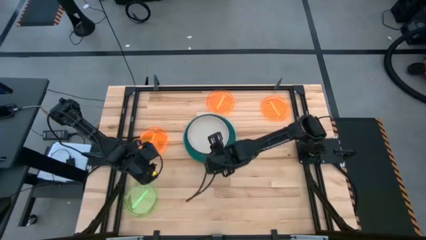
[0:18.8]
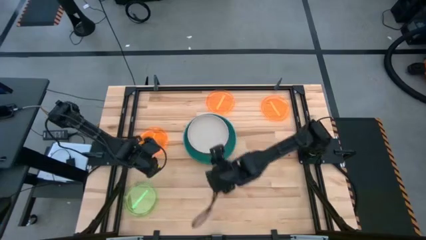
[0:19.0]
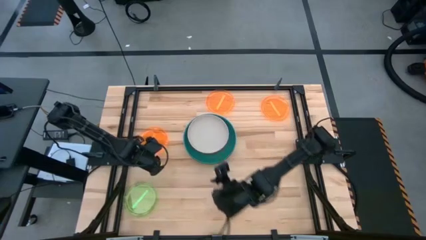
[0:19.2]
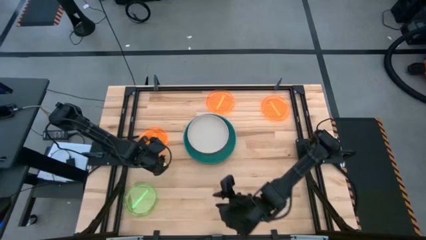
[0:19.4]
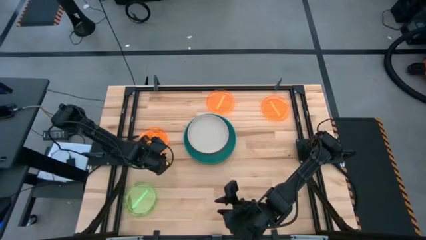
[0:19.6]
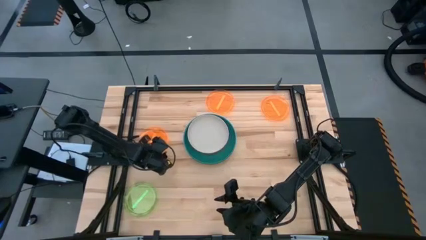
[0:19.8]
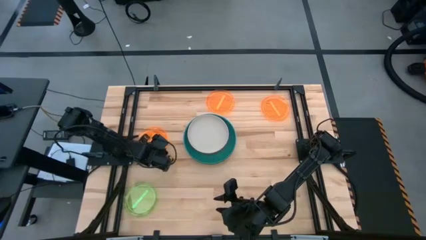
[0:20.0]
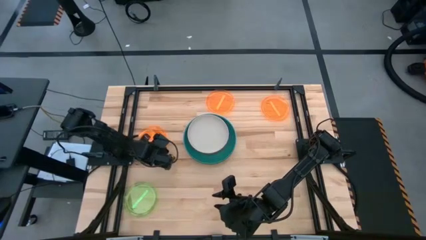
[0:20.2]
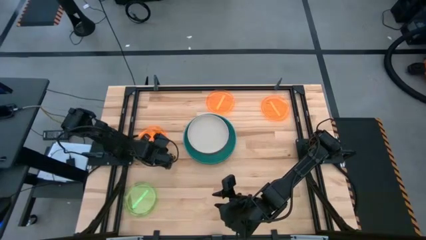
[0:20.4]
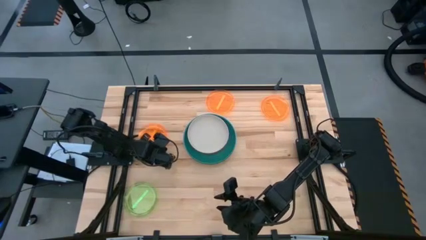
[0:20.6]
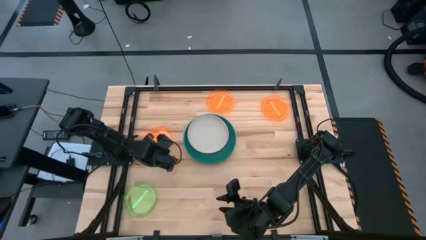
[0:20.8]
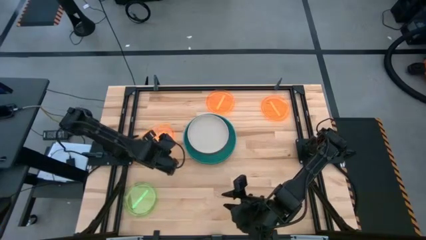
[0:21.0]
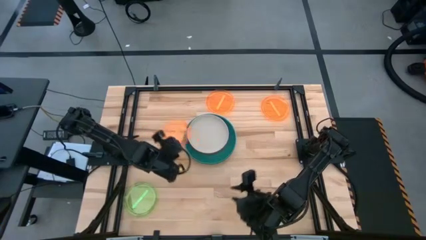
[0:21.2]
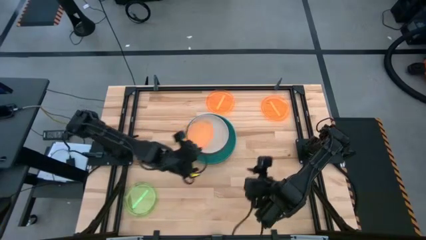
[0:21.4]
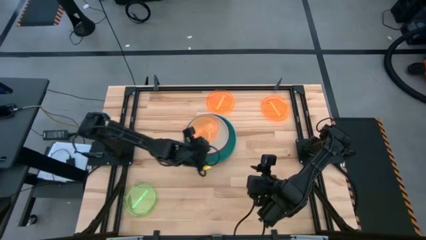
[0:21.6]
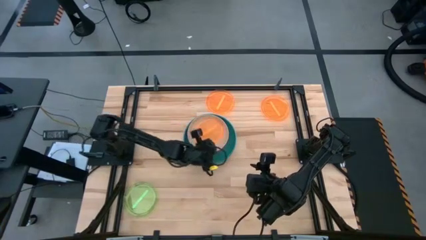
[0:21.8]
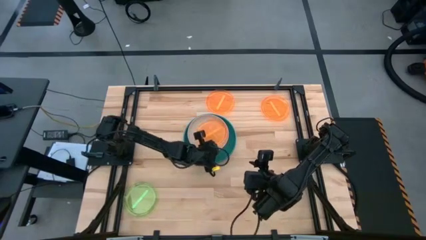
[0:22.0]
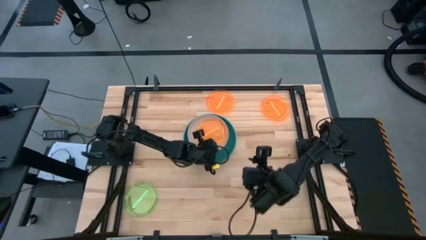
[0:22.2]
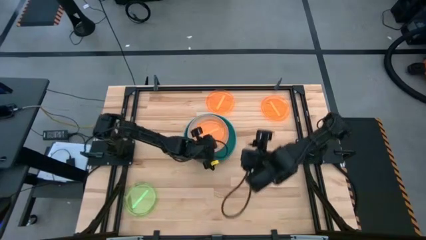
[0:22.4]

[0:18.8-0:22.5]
Task: Stack plastic plates
Stack the bottom transparent orange plate on top of the white plate

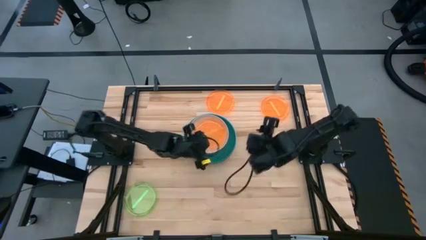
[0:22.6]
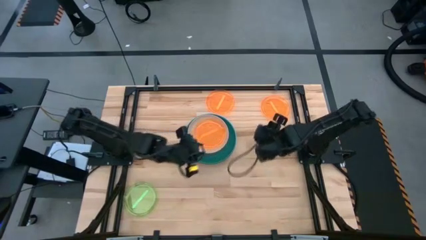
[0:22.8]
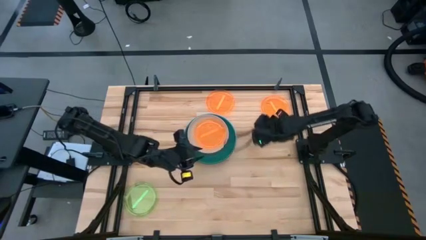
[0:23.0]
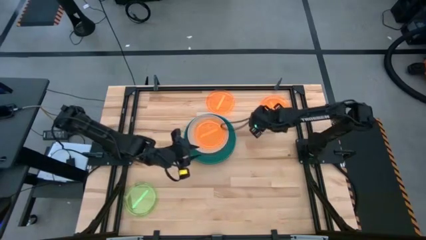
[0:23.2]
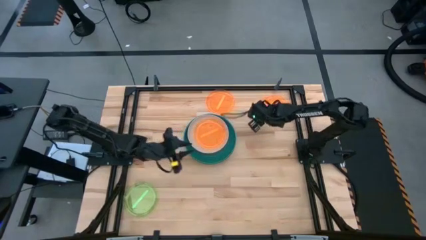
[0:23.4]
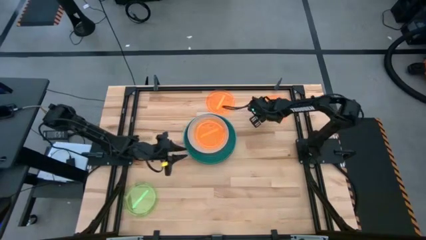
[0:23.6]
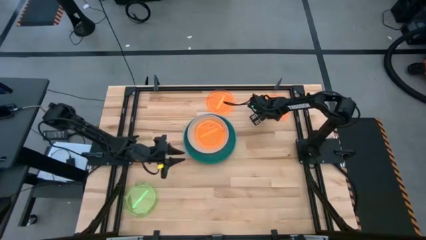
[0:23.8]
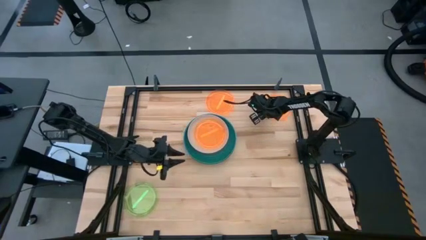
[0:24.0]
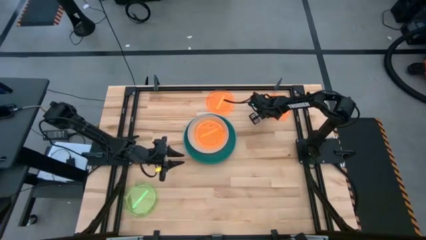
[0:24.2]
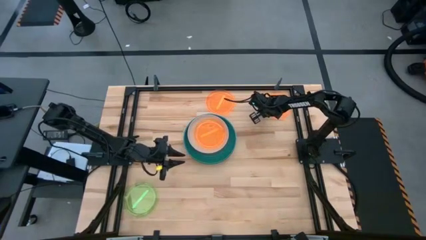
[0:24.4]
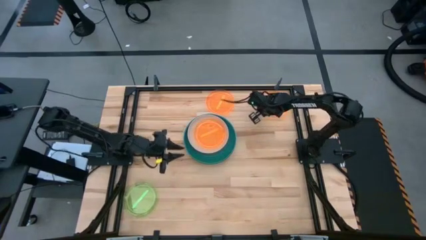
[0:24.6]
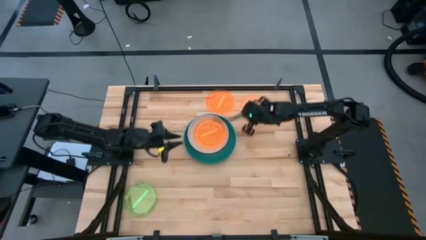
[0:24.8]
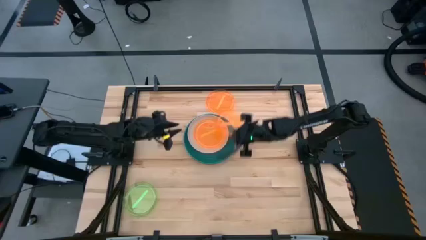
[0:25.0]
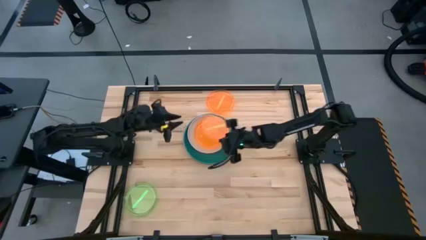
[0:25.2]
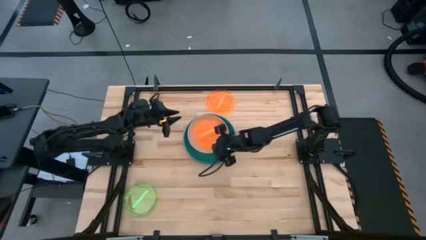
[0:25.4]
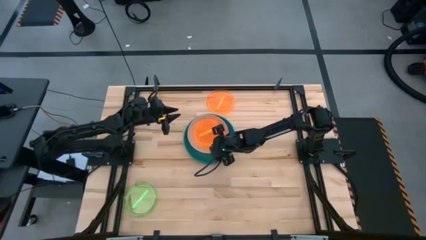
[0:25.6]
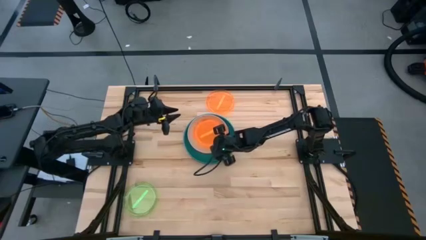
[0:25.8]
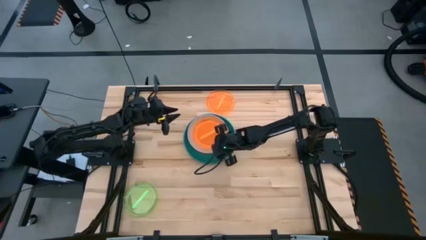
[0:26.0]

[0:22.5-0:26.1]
Stack the right transparent orange plate on top of the transparent orange plate

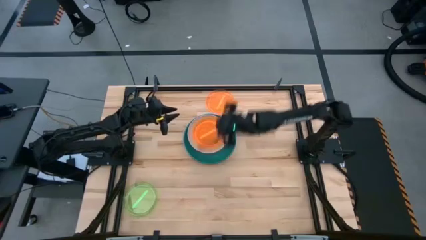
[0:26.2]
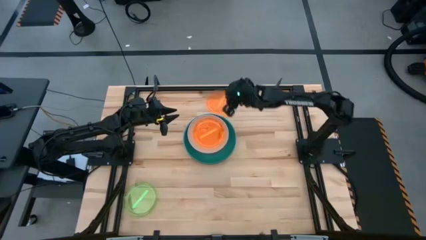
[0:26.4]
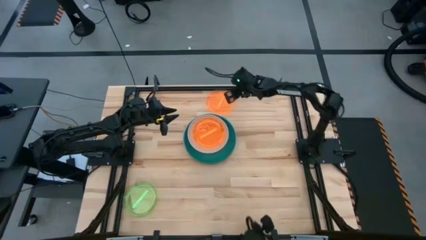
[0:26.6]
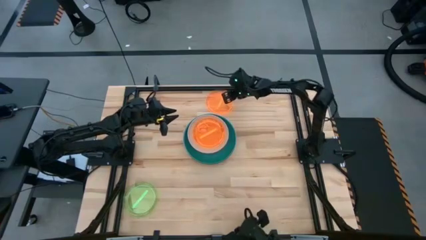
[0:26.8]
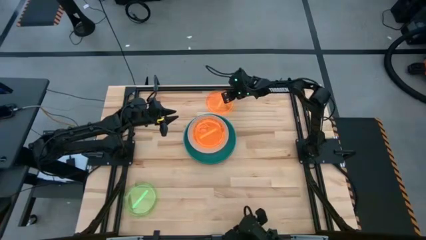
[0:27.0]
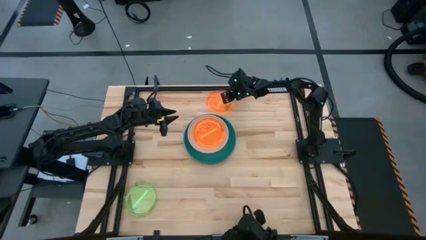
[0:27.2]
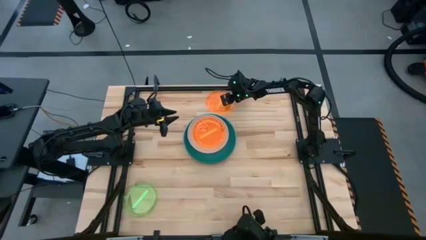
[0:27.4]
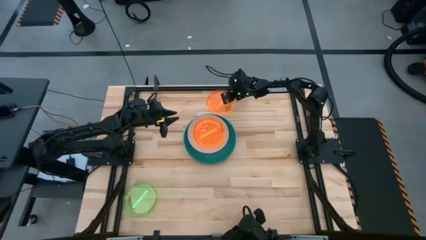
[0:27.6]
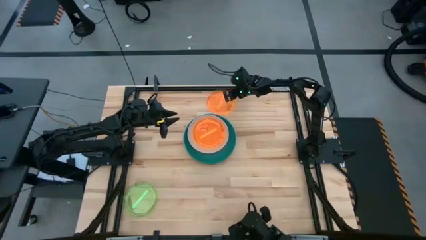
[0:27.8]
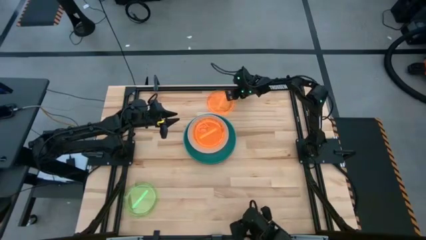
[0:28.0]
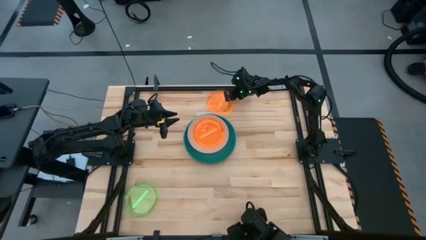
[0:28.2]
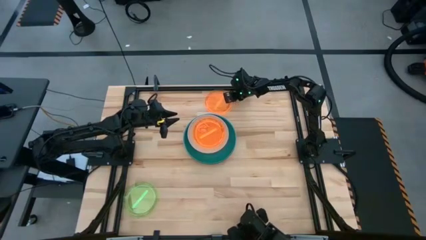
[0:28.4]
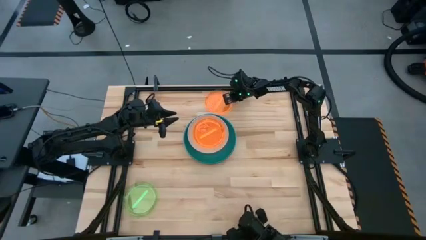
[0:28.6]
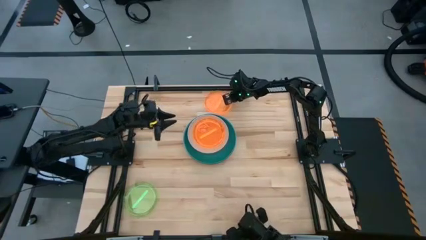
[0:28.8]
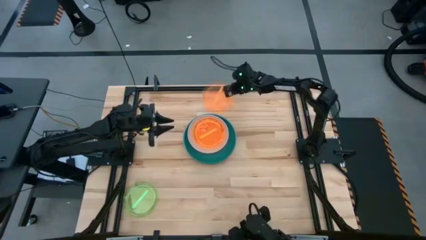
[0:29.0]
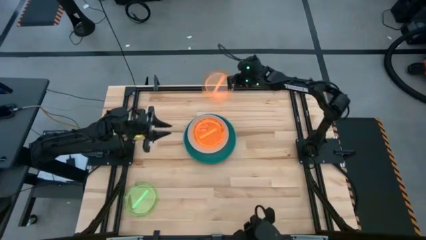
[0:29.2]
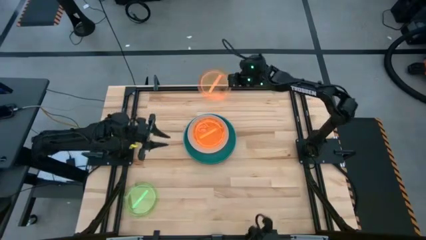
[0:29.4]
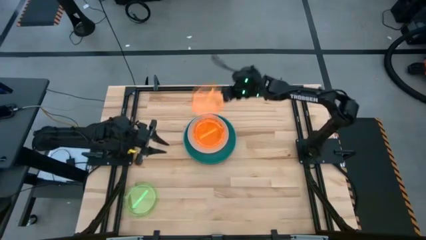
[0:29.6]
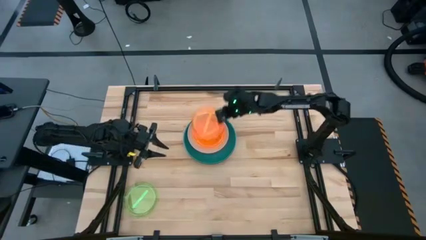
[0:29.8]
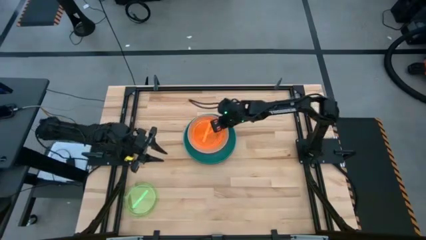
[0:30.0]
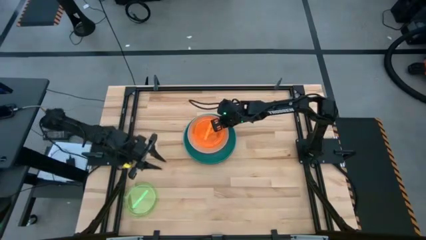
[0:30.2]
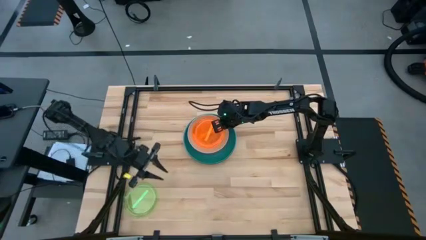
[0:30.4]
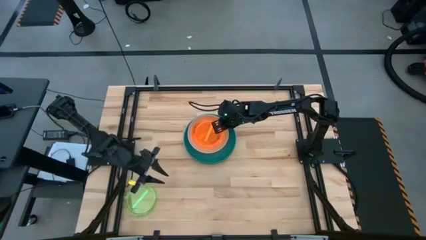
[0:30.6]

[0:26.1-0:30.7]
Stack the transparent orange plate on top of the transparent orange plate

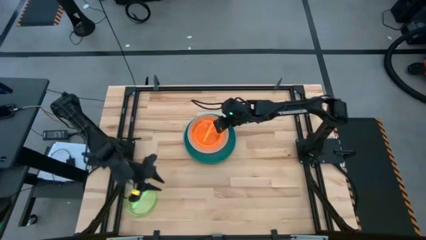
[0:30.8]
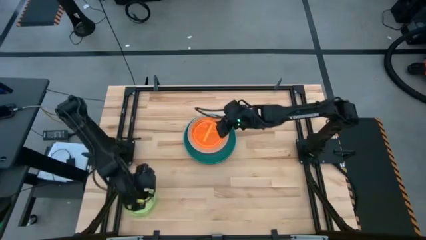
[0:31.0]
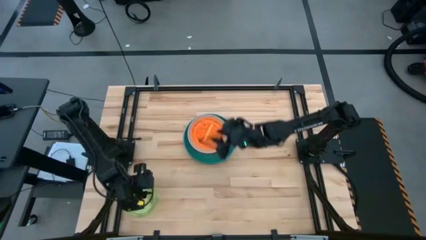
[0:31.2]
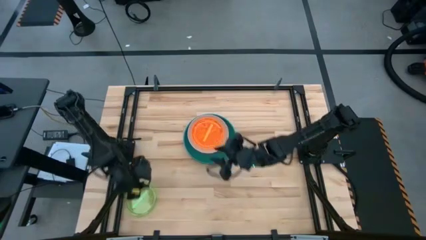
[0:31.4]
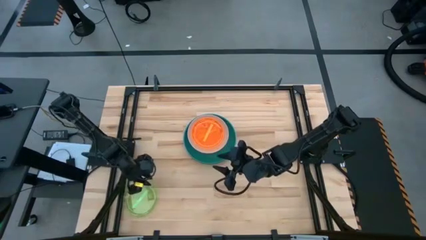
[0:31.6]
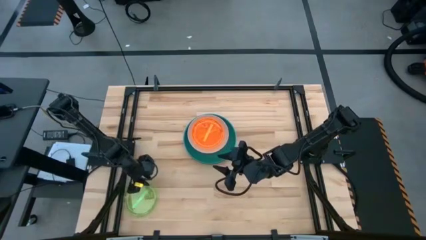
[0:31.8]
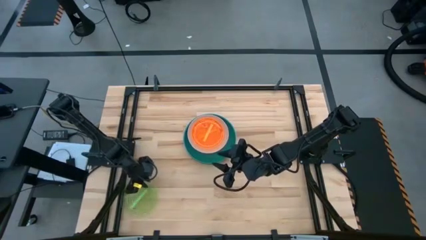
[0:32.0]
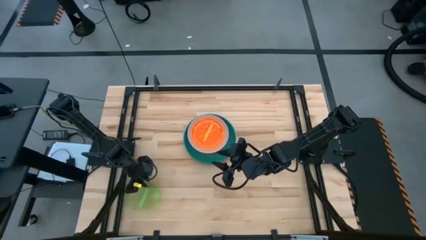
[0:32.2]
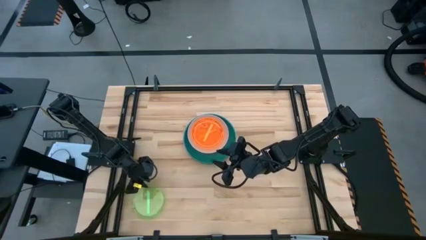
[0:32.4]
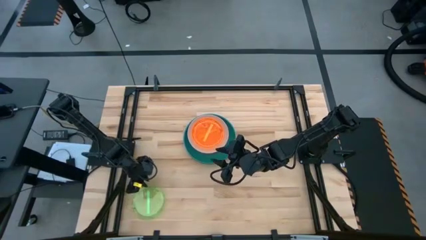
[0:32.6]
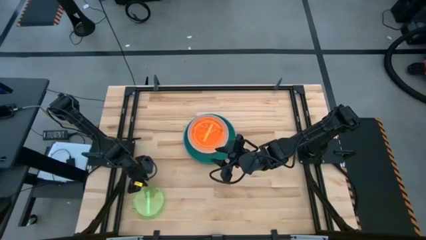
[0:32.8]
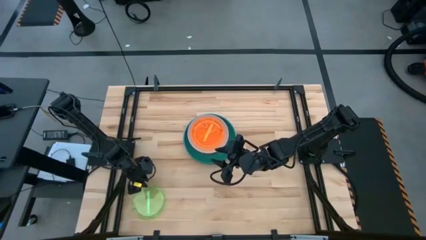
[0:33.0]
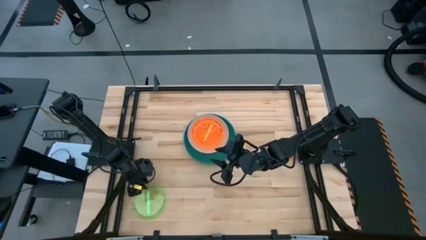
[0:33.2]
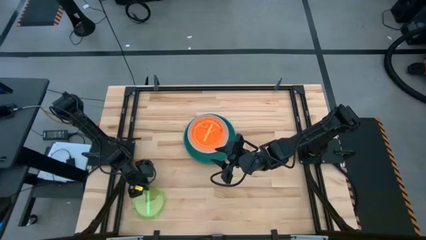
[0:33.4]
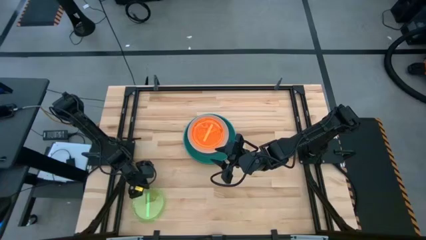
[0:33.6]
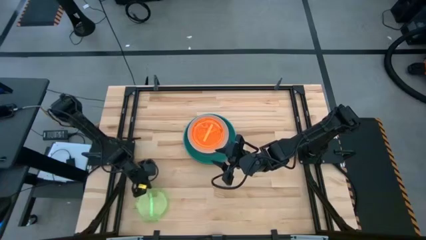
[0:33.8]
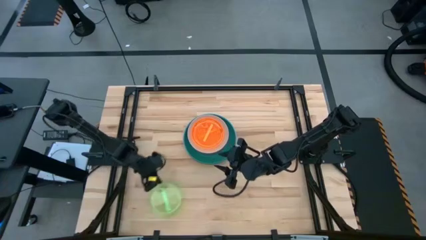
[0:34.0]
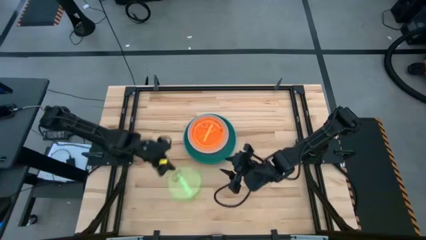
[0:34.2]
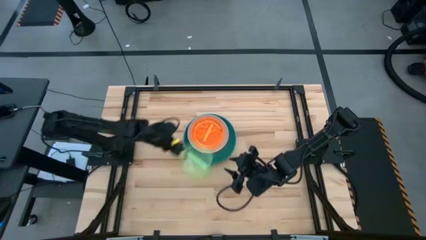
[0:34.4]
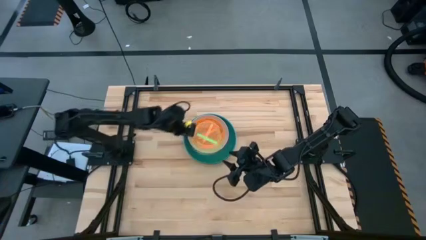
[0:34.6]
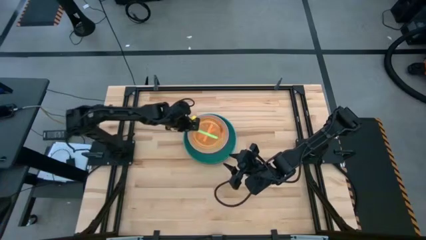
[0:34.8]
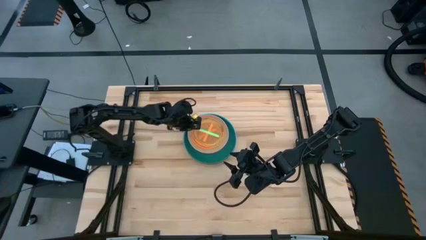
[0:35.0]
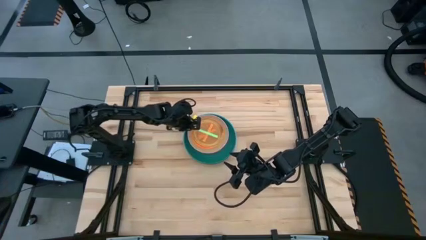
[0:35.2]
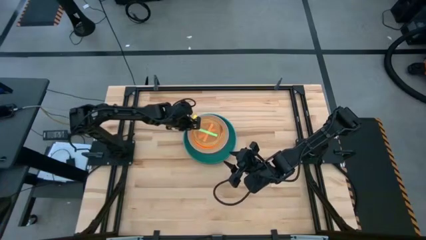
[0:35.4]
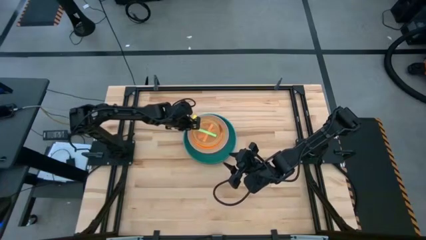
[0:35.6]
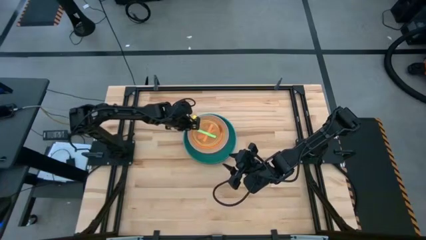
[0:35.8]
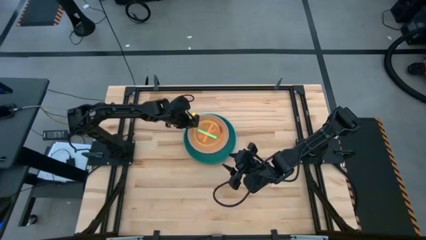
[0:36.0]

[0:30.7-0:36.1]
Stack the transparent green plate on top of the transparent orange plate
